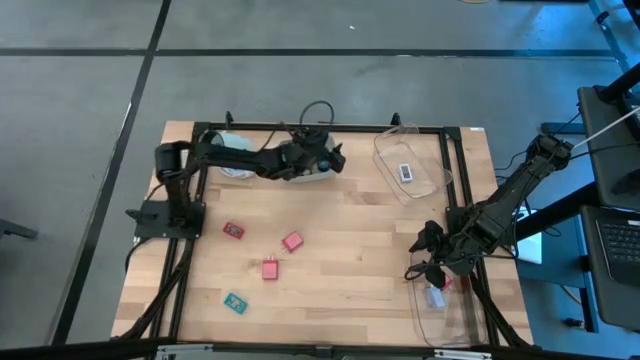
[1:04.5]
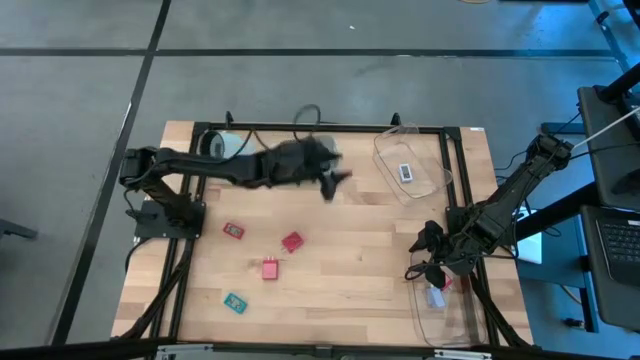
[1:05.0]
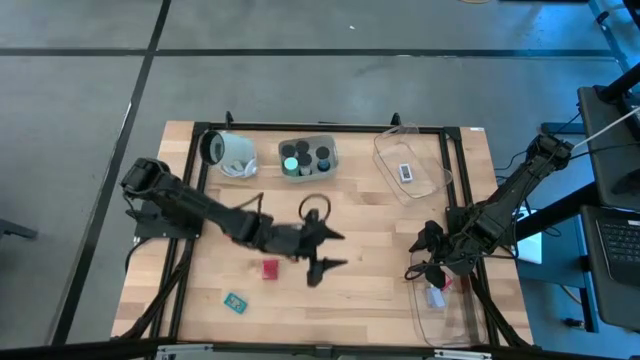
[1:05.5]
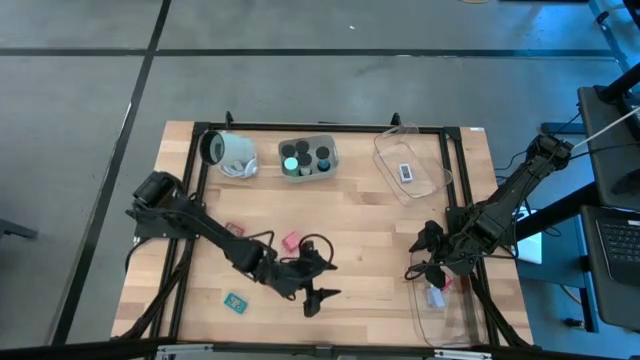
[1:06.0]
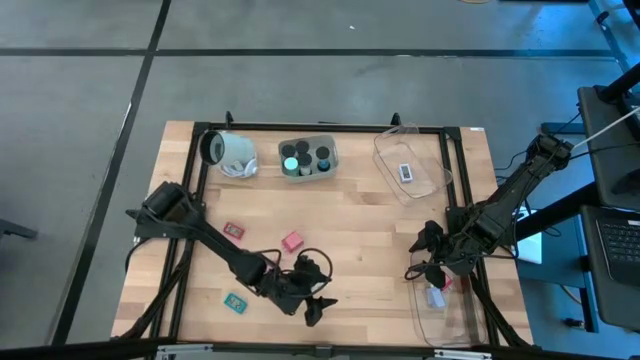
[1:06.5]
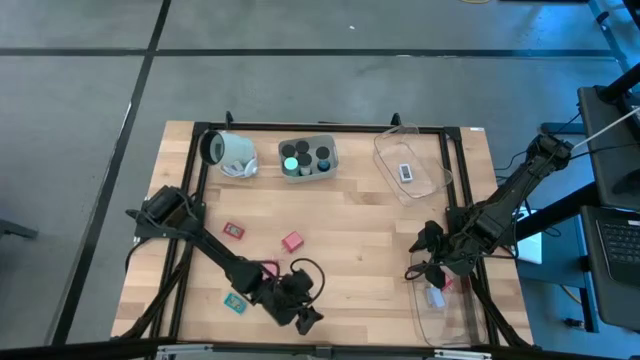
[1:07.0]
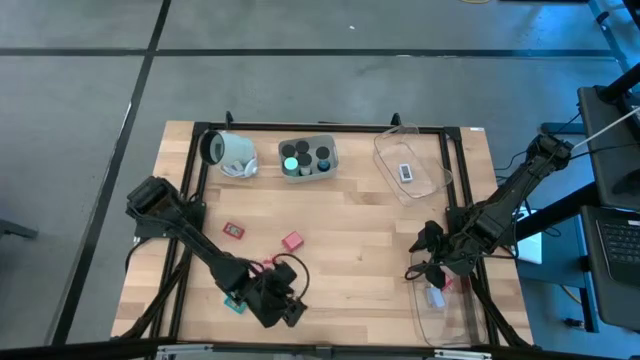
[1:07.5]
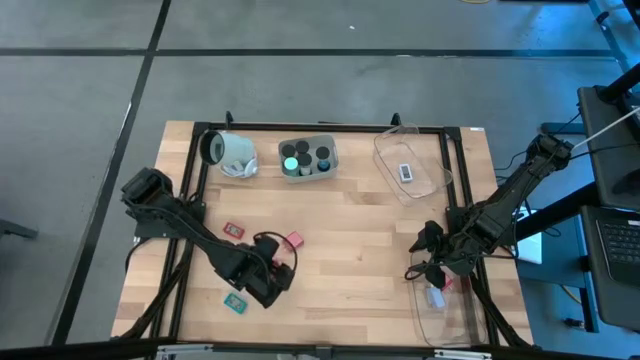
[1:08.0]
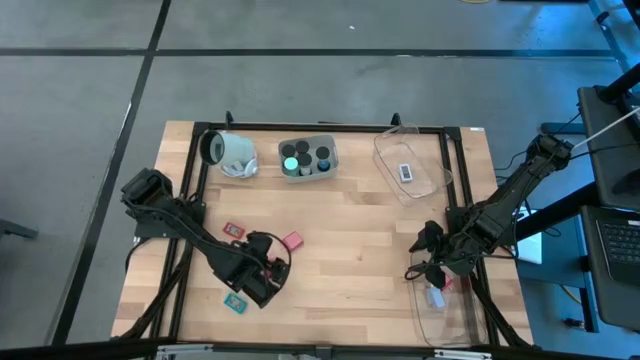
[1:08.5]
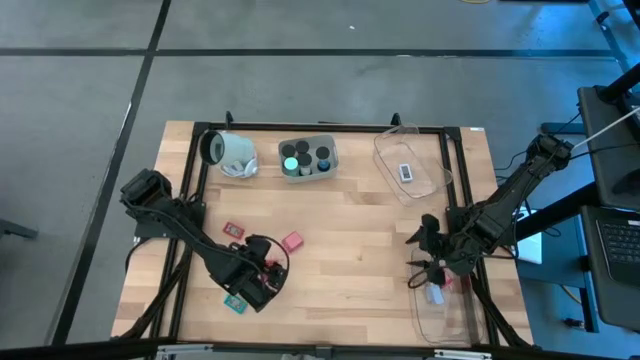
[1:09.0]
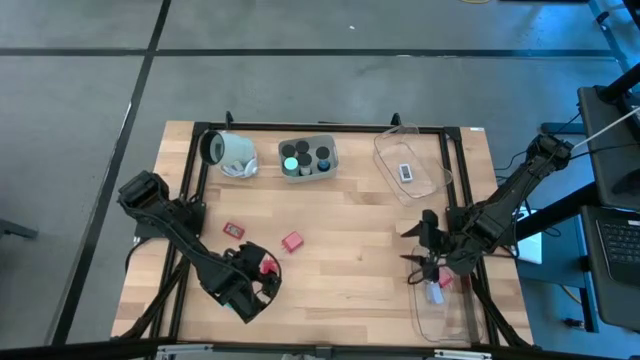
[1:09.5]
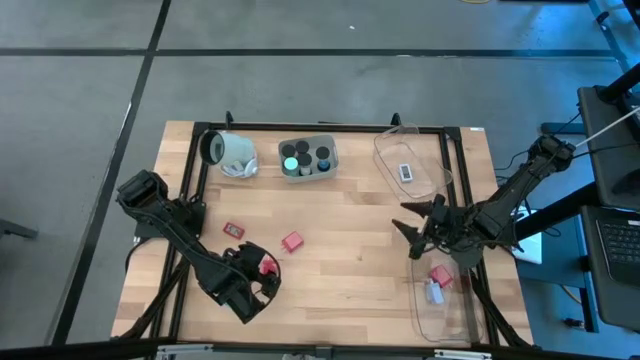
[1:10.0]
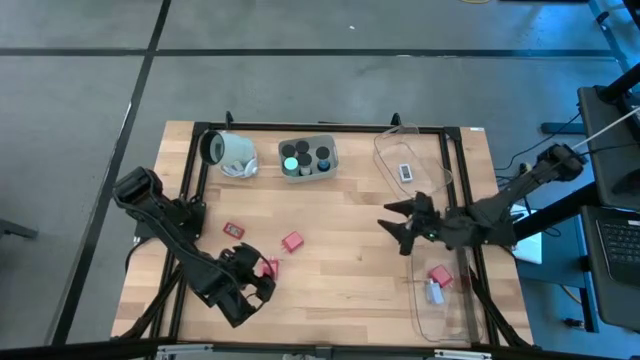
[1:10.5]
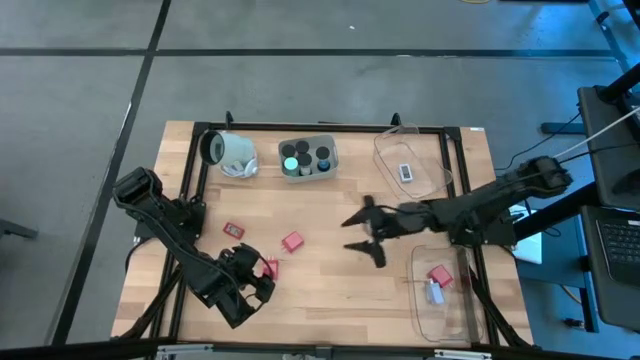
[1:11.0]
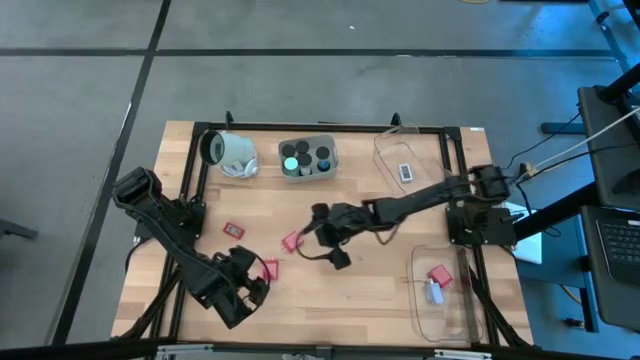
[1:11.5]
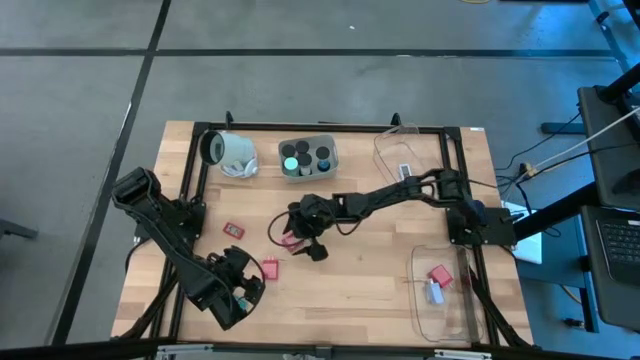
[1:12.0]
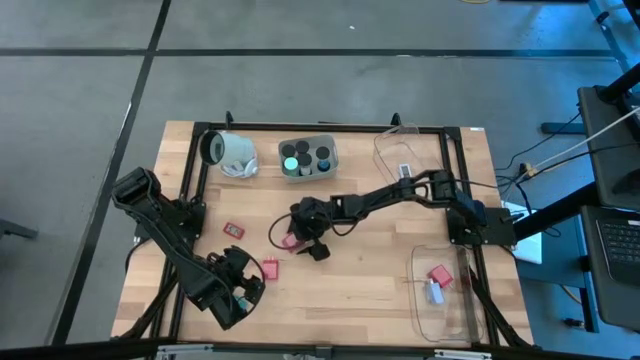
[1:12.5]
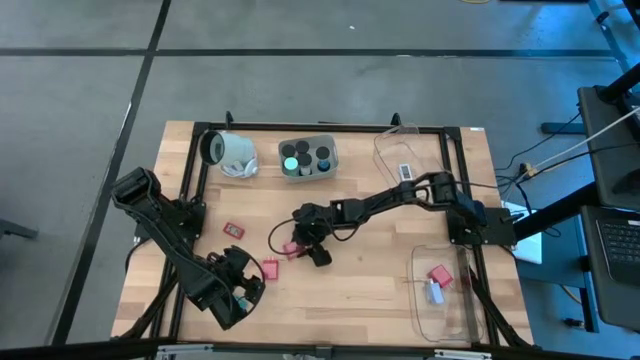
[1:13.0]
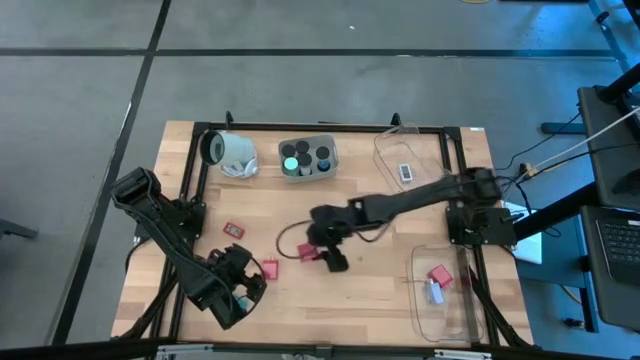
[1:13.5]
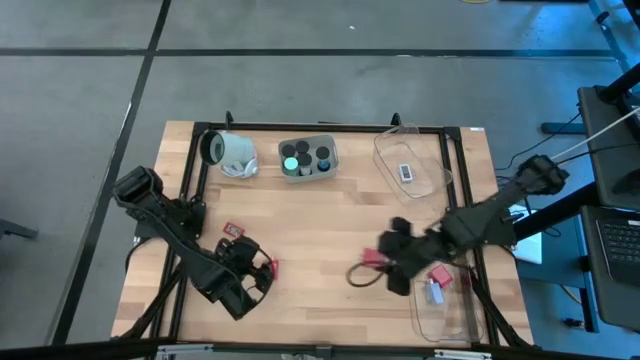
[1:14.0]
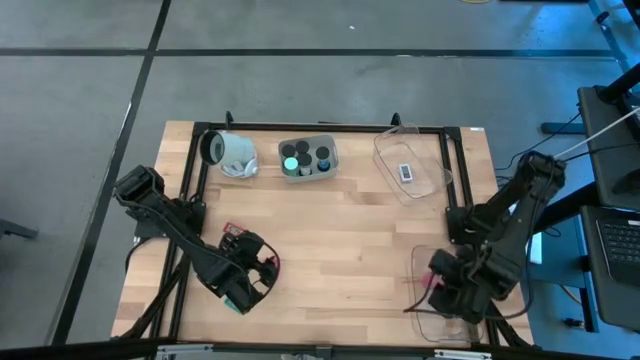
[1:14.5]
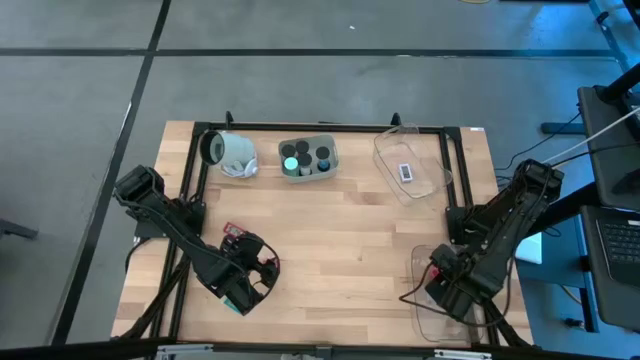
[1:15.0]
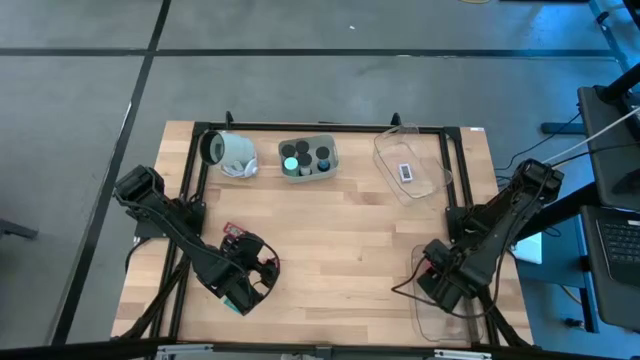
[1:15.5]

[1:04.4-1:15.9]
Task: Pick & Place Office items
Put the top red charger adapter into the bottom transparent bin

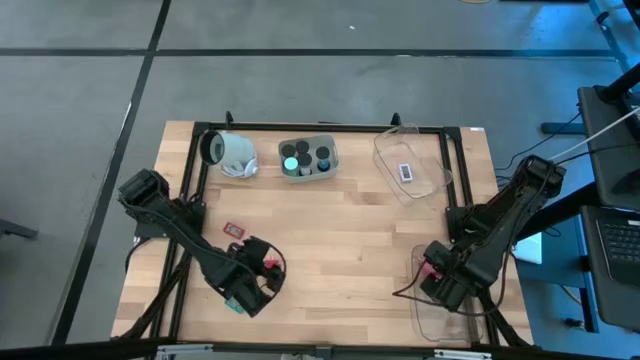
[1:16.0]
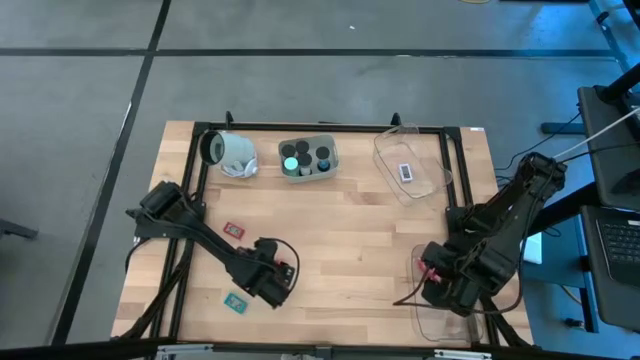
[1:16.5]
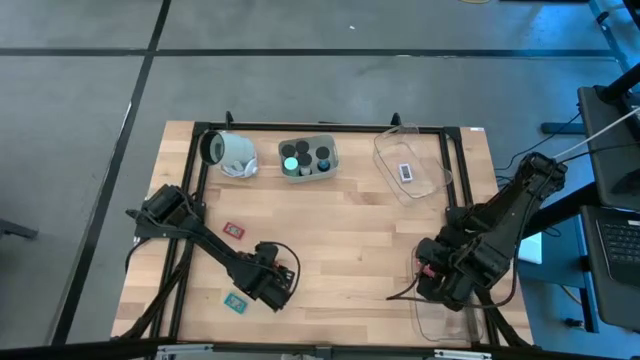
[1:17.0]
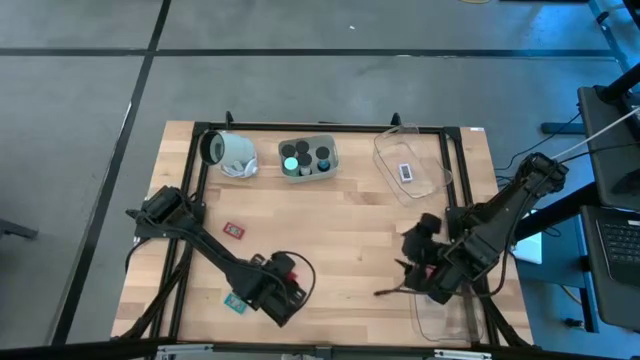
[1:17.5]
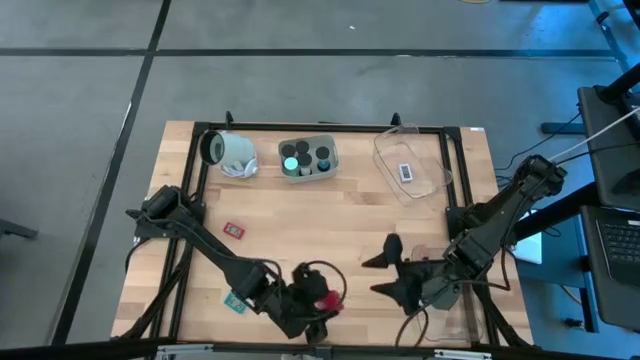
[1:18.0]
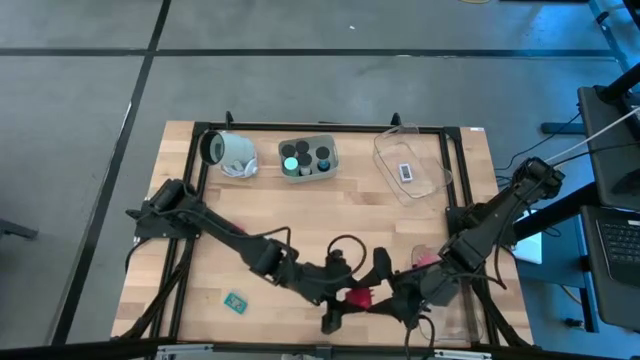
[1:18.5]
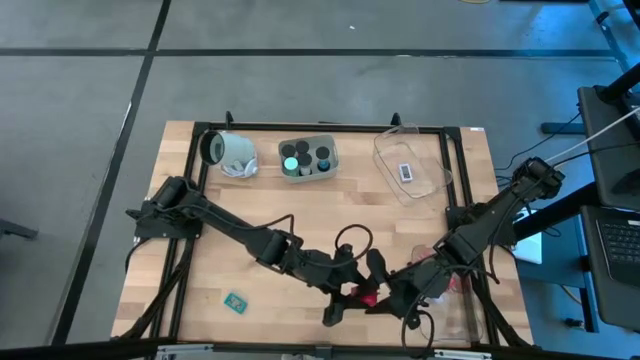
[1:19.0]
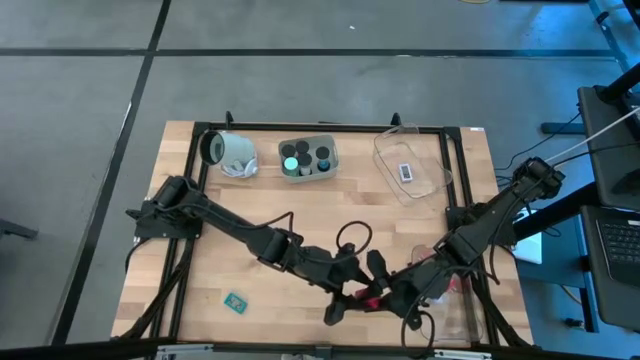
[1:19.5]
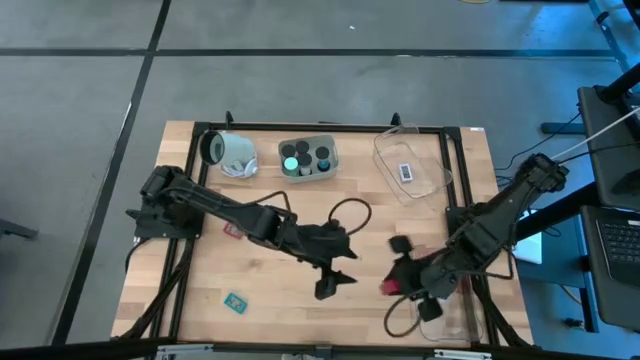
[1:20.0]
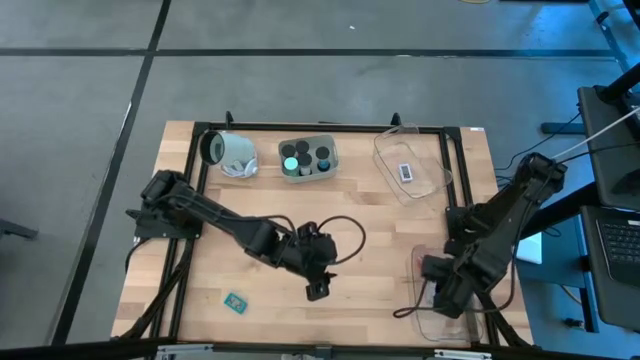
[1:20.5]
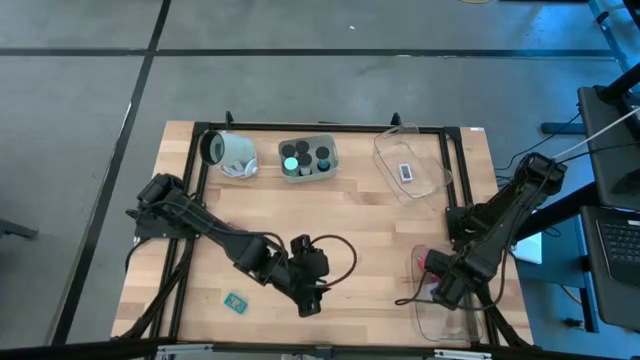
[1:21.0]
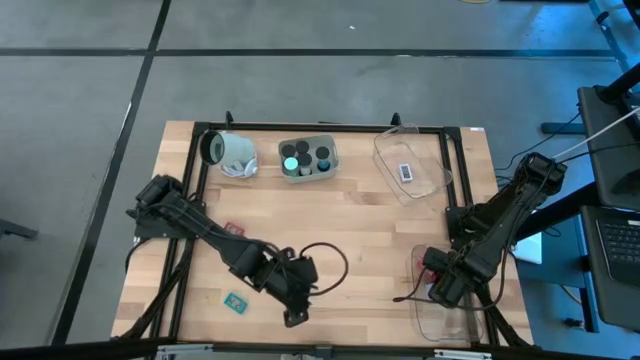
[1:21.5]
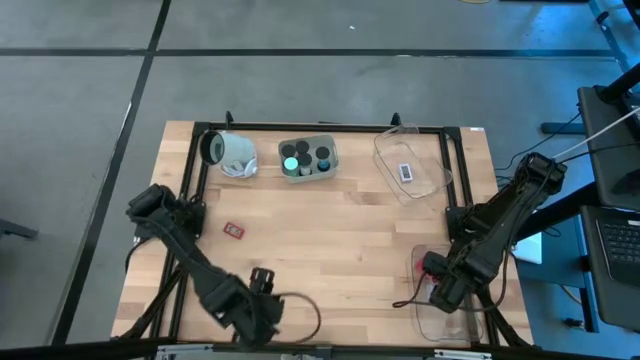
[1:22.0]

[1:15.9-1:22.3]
Put the red charger adapter into the bottom transparent bin
